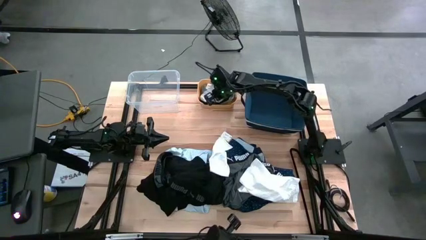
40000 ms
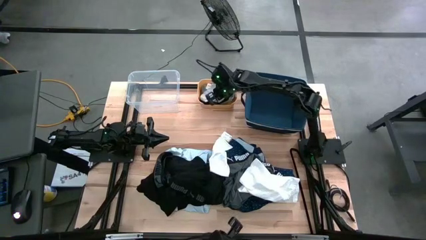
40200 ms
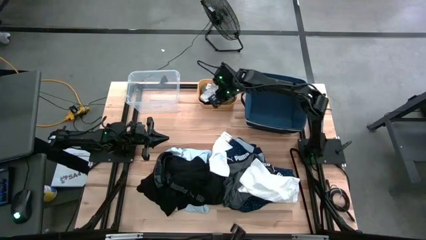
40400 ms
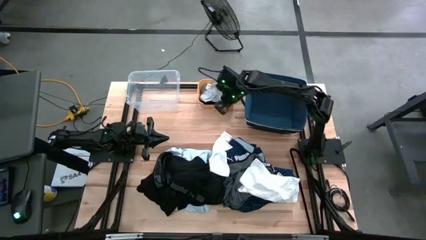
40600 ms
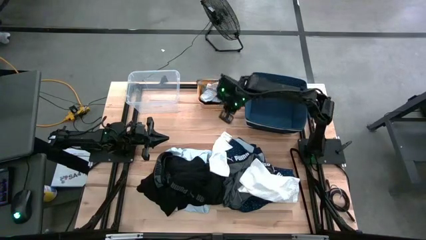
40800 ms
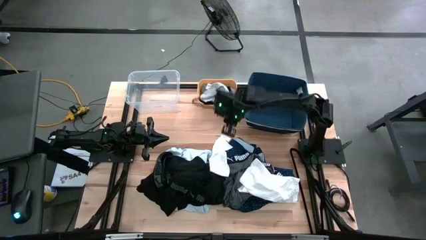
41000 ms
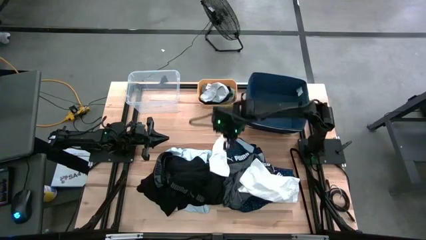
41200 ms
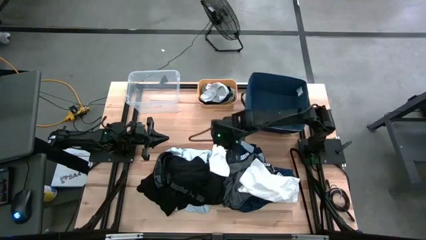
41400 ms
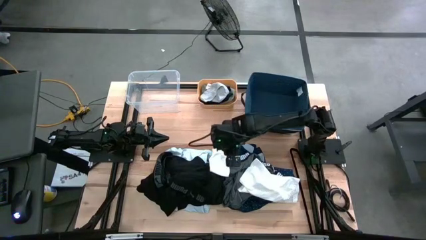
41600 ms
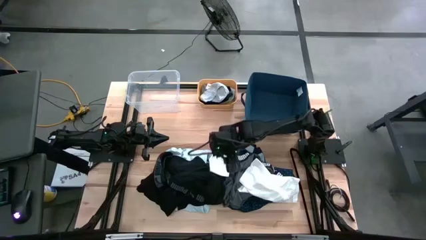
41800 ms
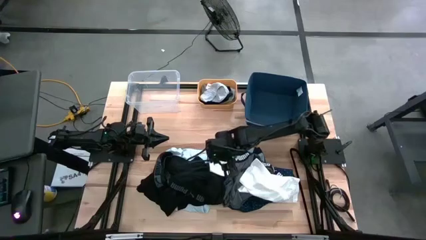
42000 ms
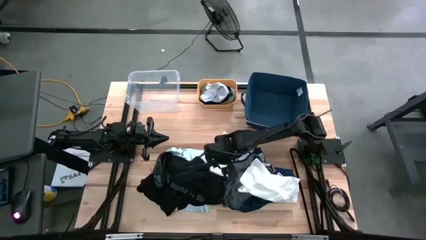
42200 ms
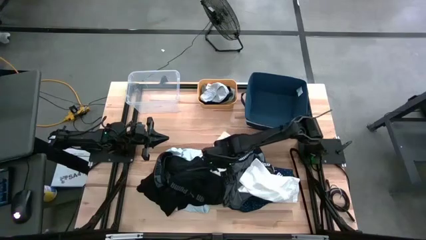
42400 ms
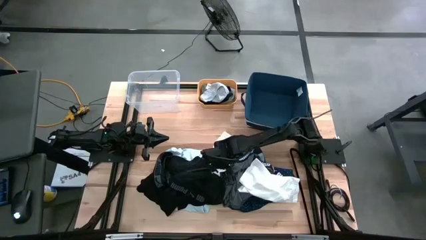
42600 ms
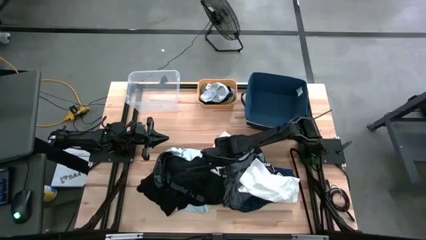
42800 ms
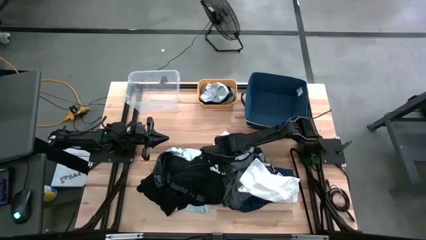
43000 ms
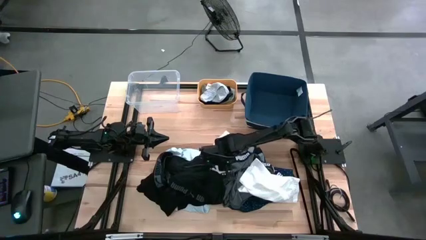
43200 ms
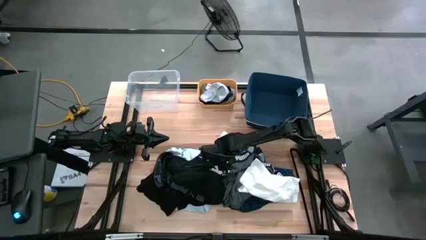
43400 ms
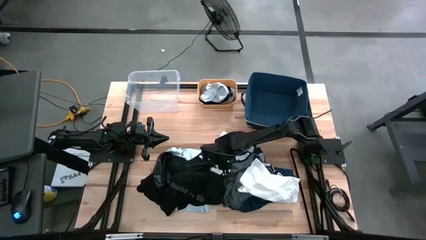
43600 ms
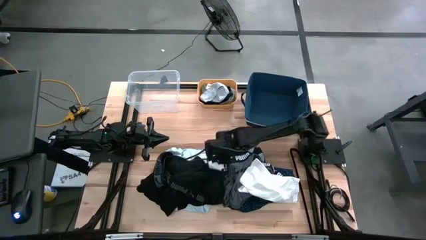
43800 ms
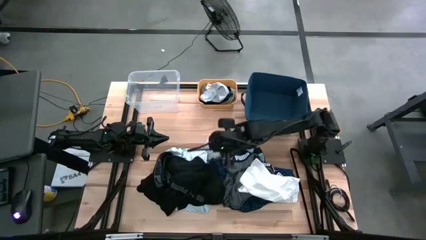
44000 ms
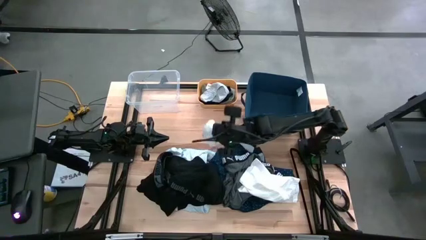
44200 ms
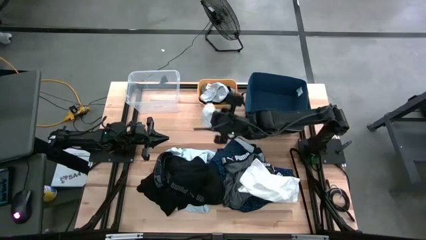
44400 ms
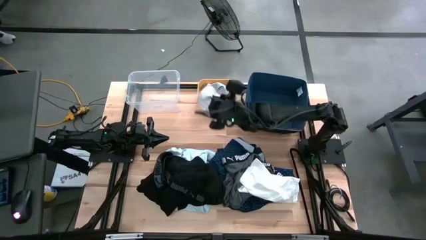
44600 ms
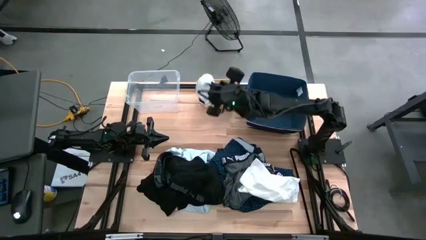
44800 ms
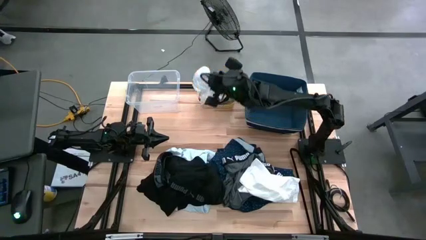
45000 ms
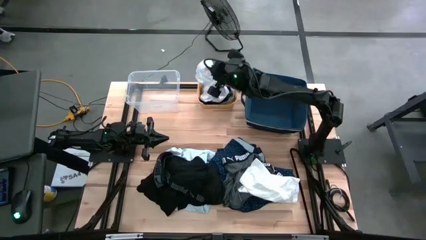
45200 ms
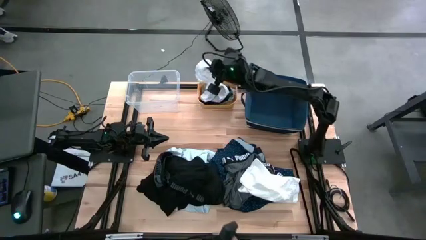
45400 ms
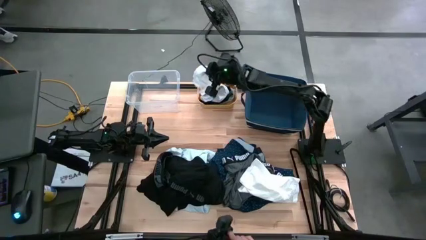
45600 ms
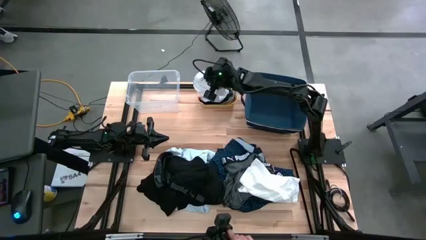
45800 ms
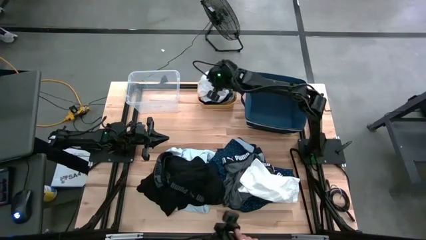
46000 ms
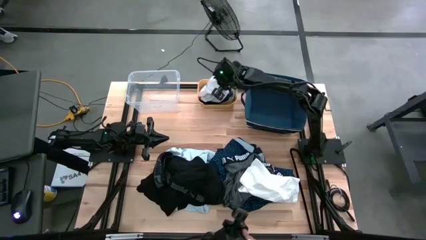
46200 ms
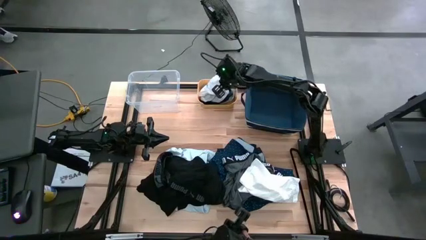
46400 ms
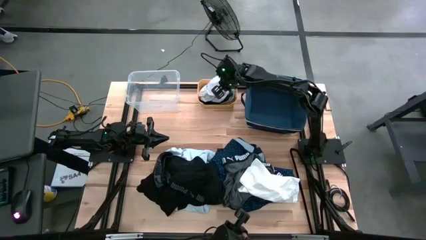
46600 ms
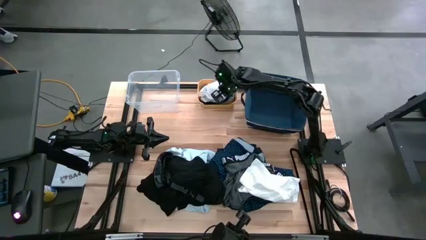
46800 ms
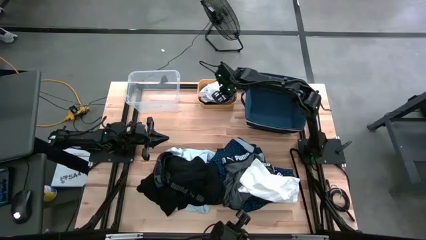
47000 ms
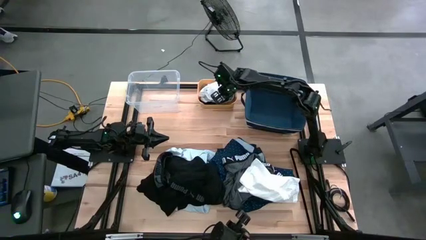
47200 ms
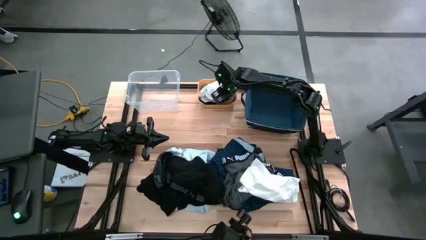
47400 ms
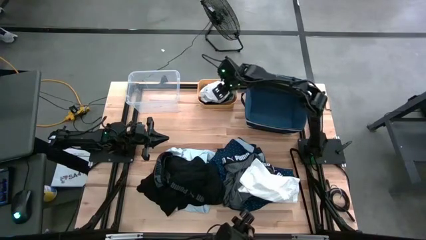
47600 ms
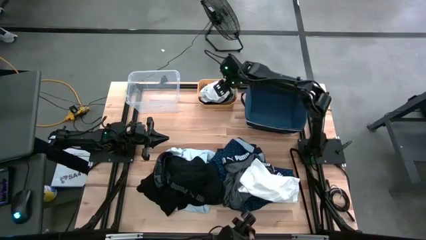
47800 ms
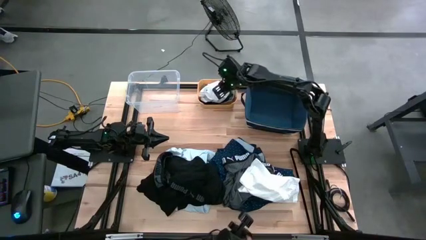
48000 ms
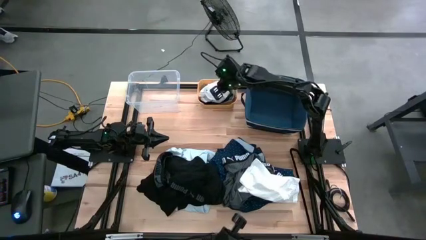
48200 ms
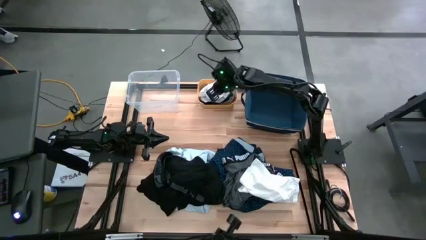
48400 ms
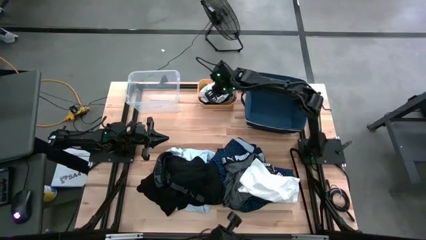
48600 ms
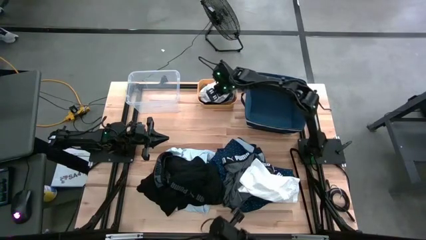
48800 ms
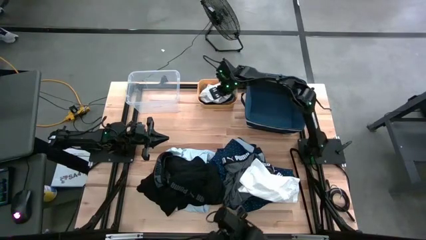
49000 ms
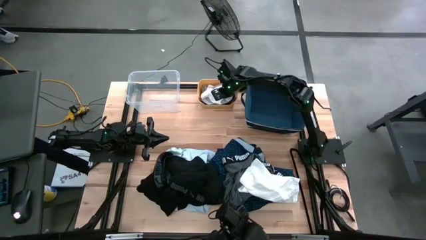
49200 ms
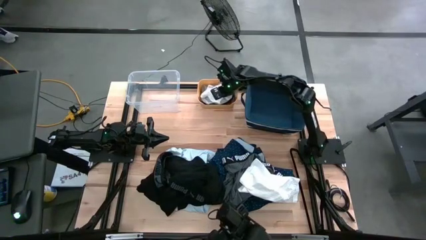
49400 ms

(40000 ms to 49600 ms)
Task: Pick & Place Cloths
Put the white sock into the yellow bin
